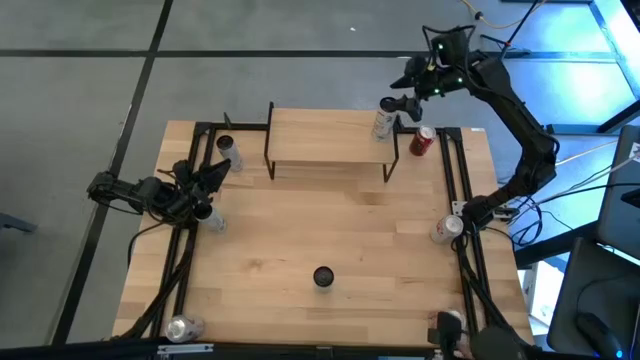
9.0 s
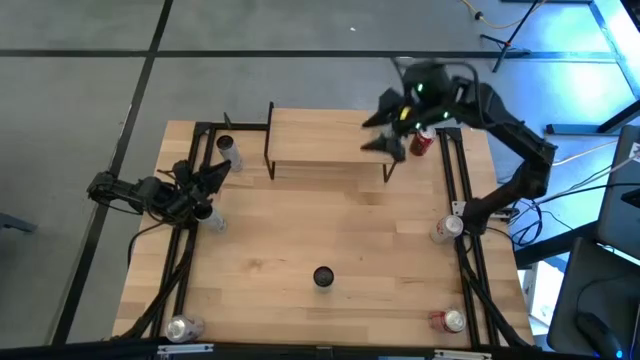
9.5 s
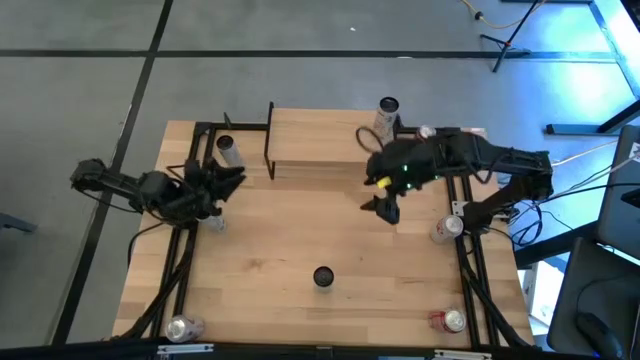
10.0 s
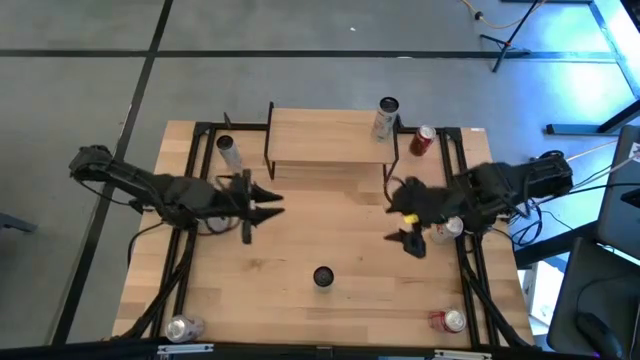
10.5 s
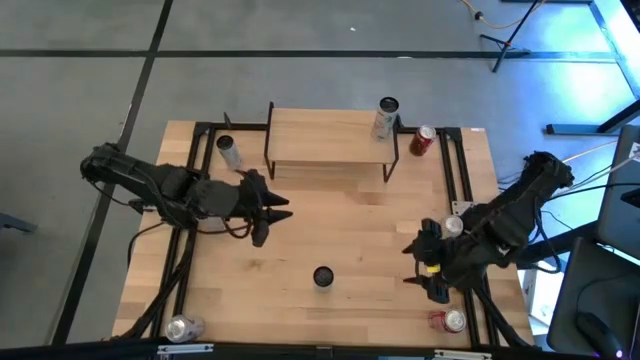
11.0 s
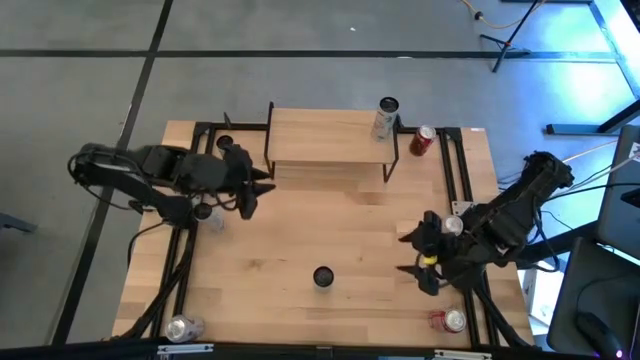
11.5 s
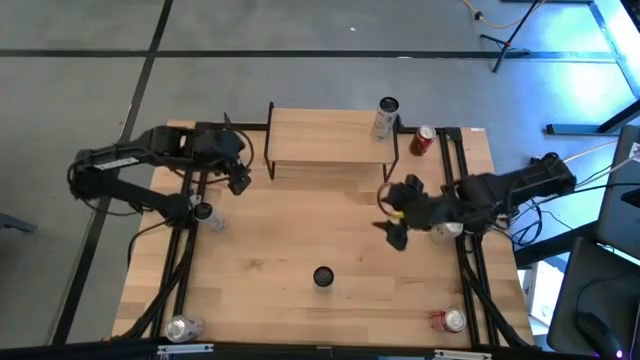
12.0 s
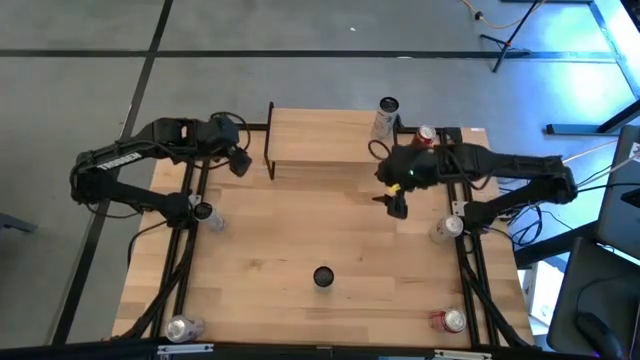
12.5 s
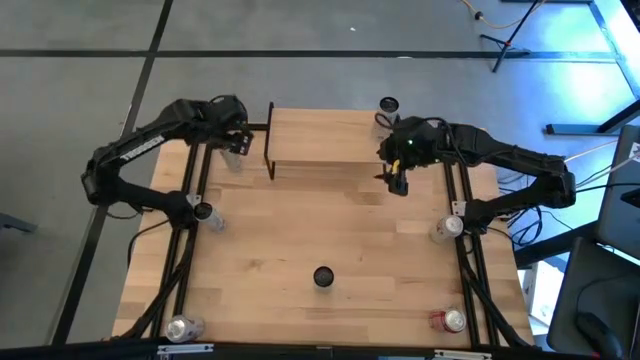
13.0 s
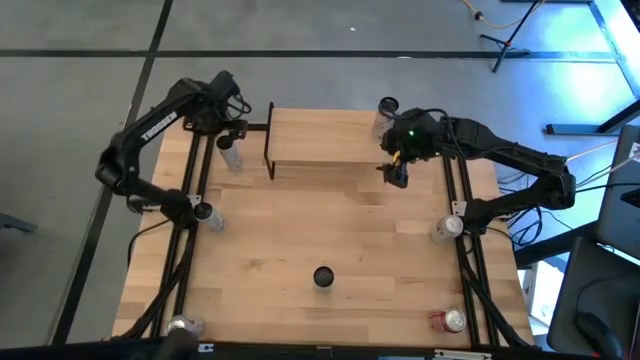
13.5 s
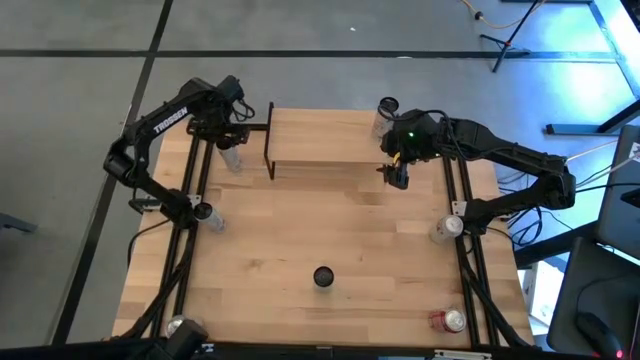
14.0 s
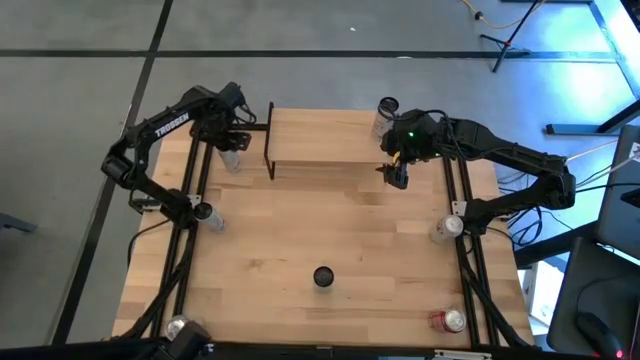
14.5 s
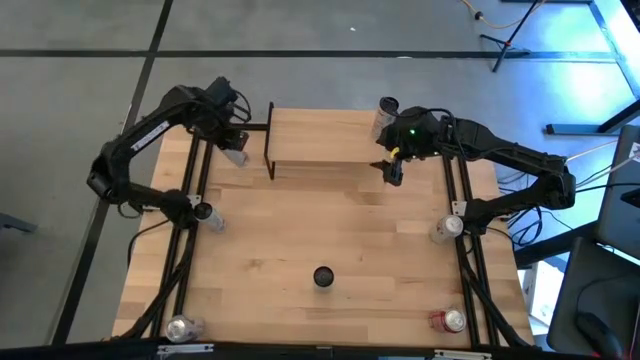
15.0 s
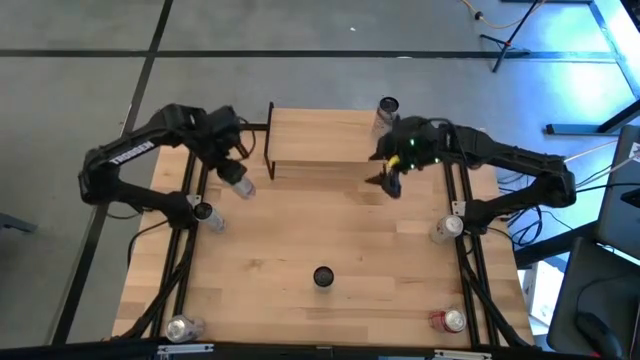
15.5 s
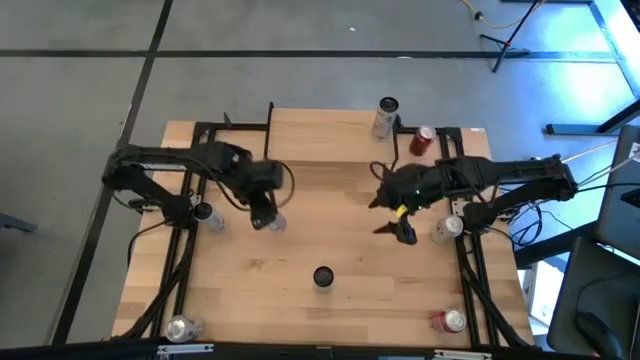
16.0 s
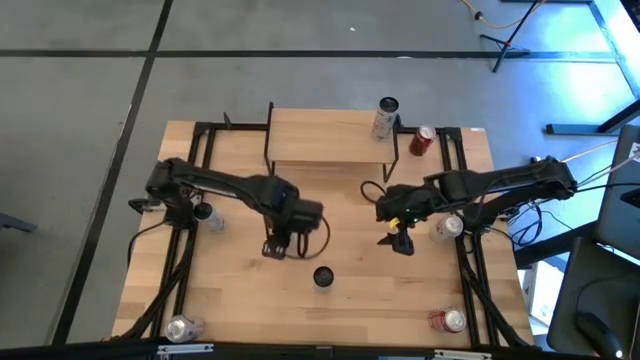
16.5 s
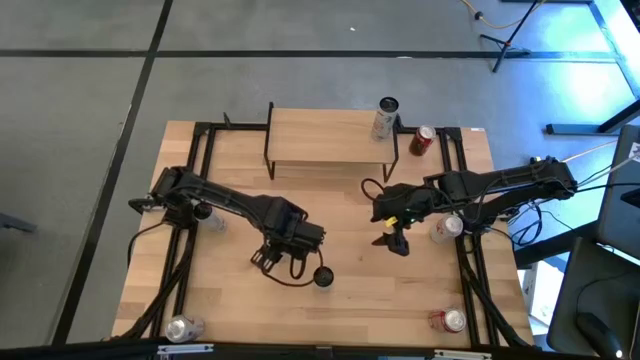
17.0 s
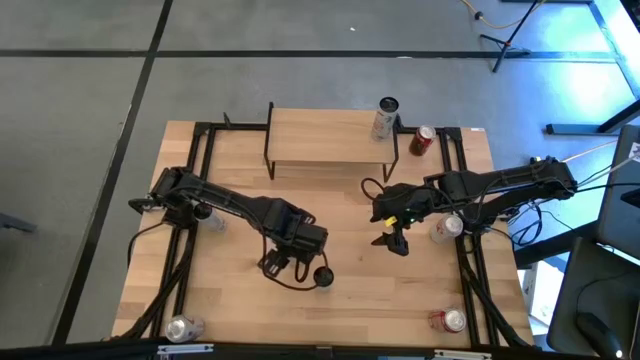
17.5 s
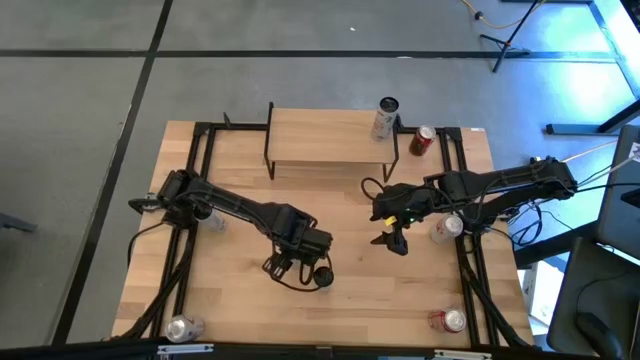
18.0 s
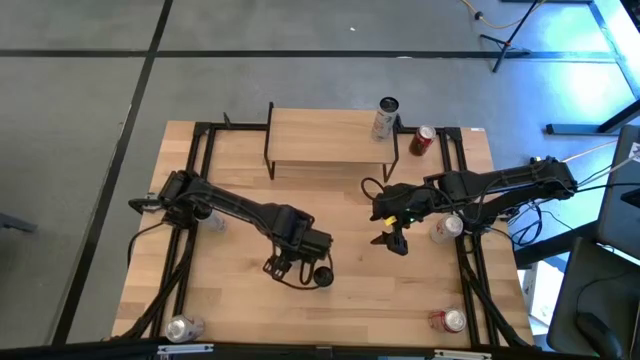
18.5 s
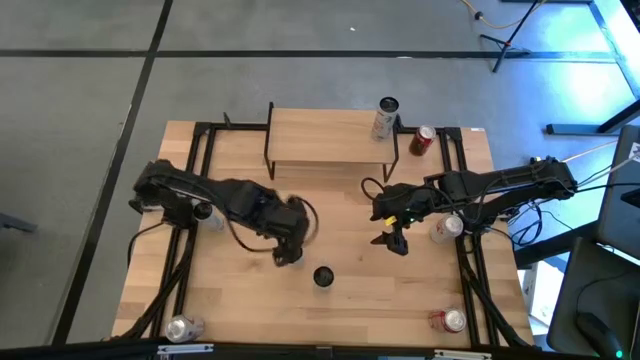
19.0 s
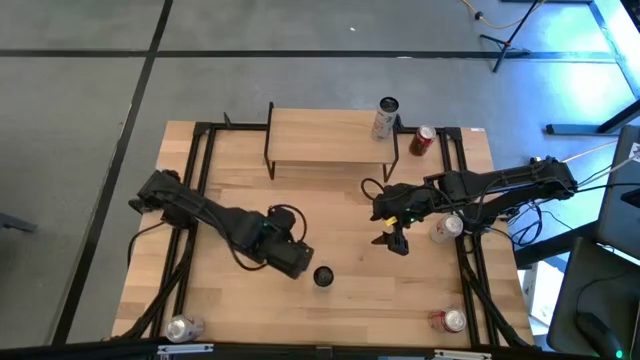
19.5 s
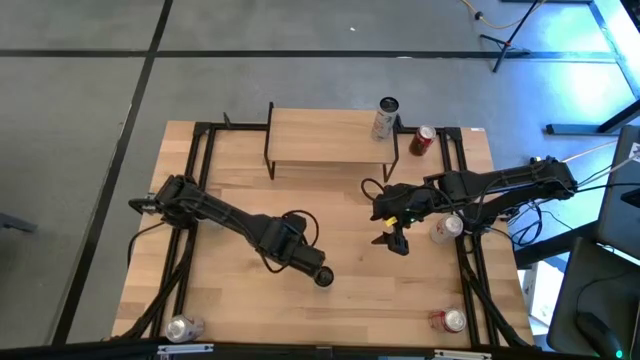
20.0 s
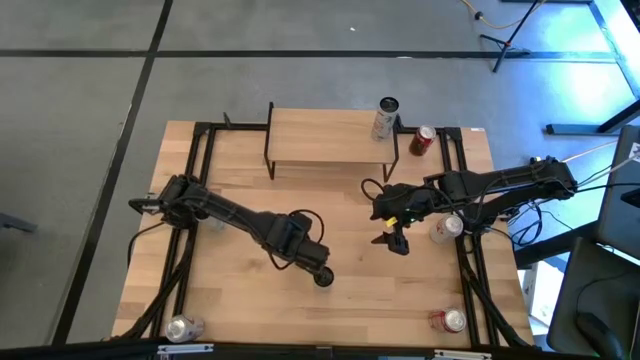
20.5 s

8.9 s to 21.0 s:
Task: Place canned beverage on shelf
Put the white-pink soda can on the shelf aligned with the other white-pink soda can

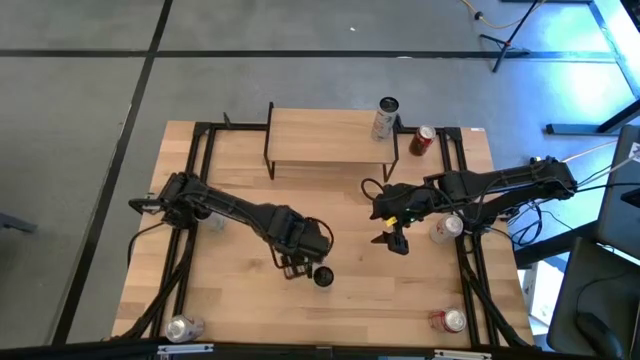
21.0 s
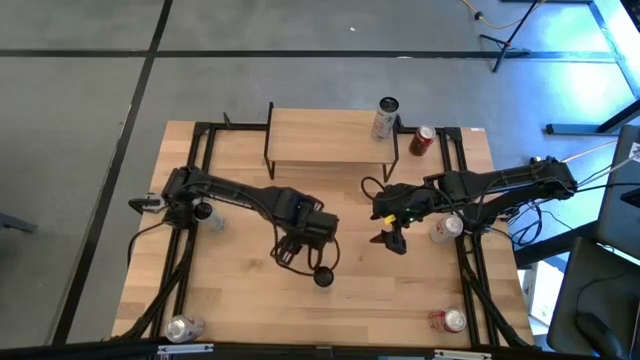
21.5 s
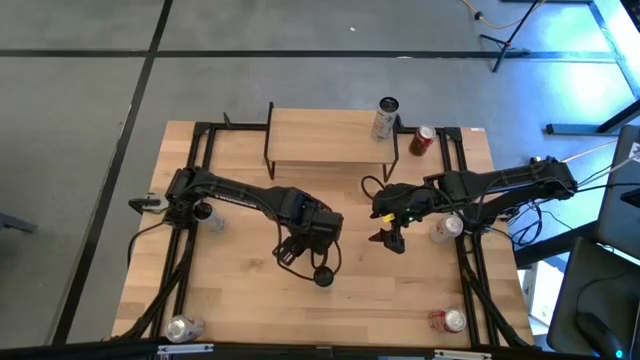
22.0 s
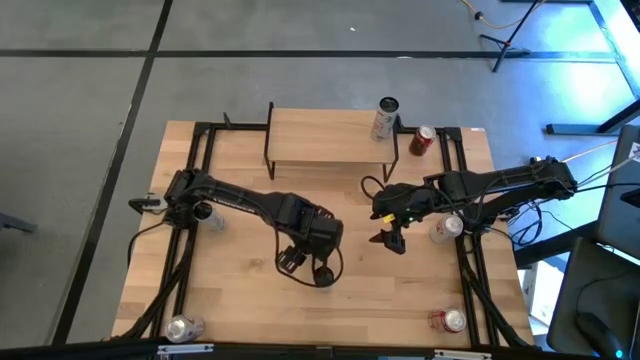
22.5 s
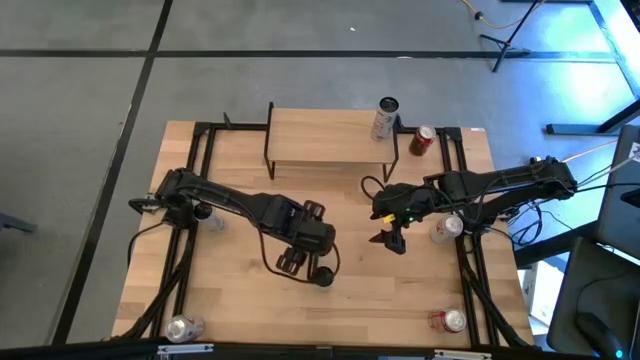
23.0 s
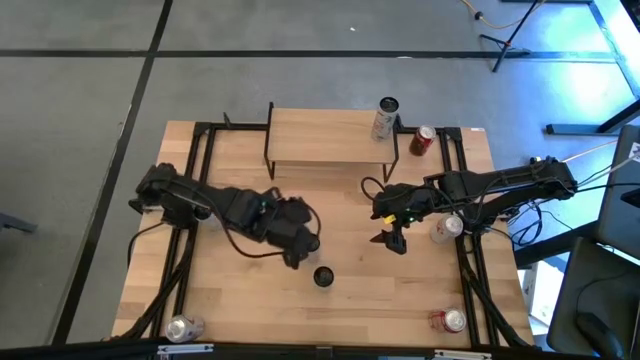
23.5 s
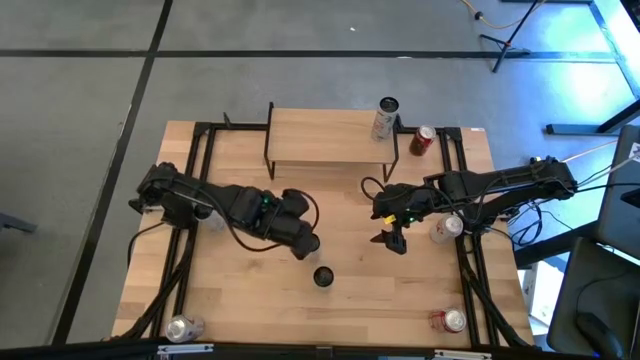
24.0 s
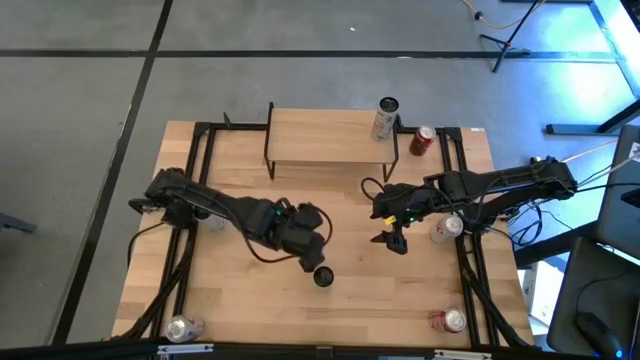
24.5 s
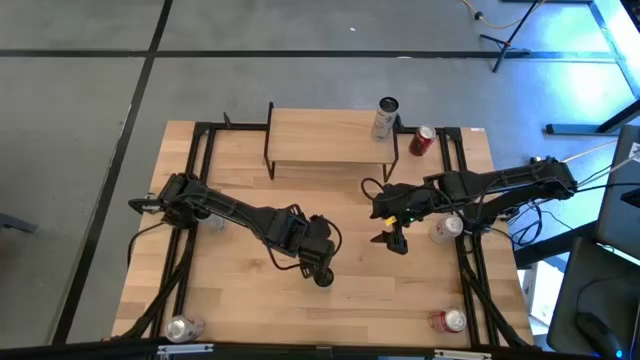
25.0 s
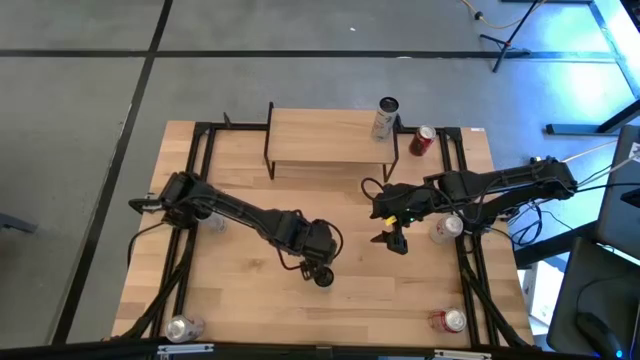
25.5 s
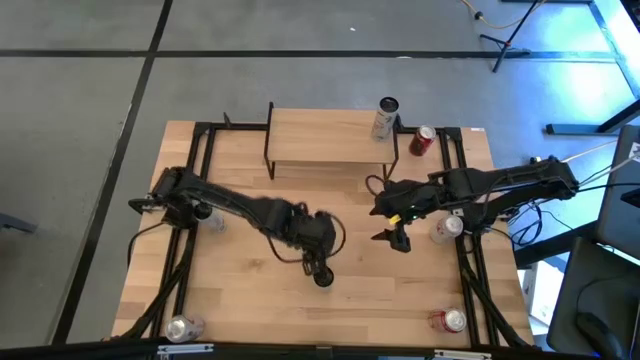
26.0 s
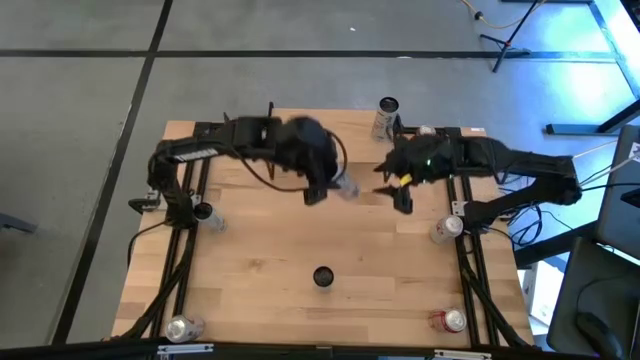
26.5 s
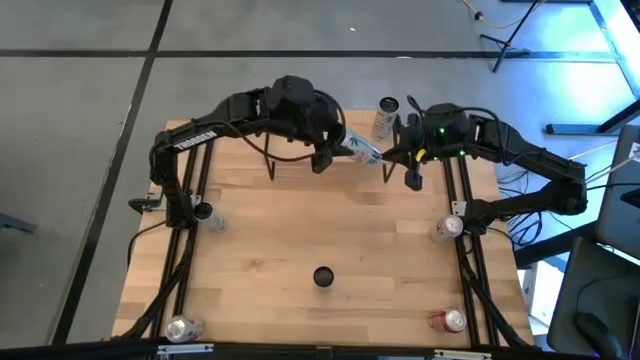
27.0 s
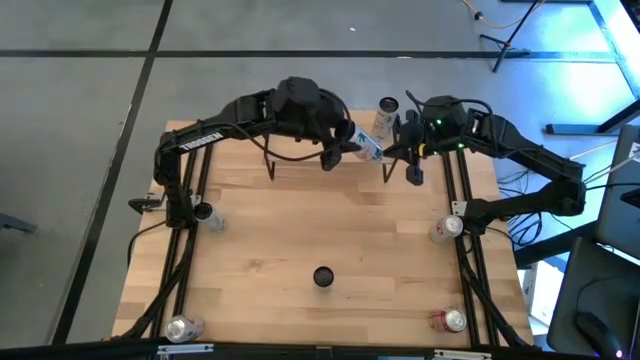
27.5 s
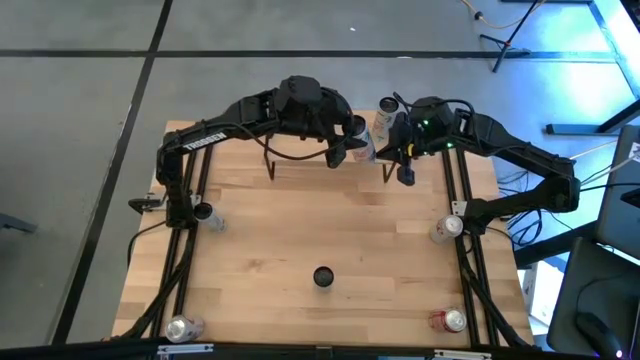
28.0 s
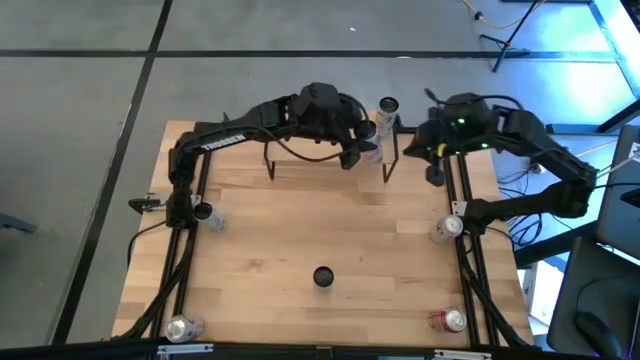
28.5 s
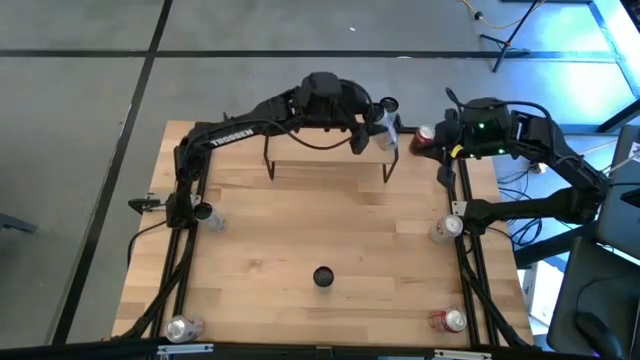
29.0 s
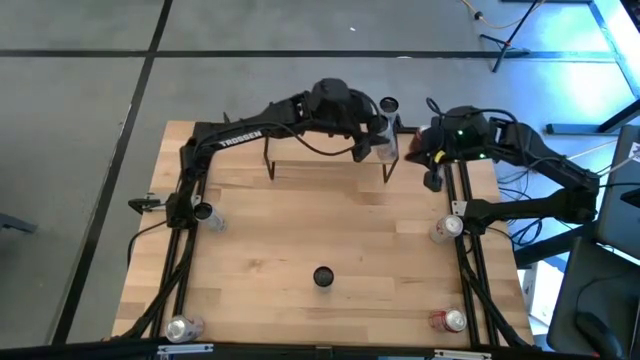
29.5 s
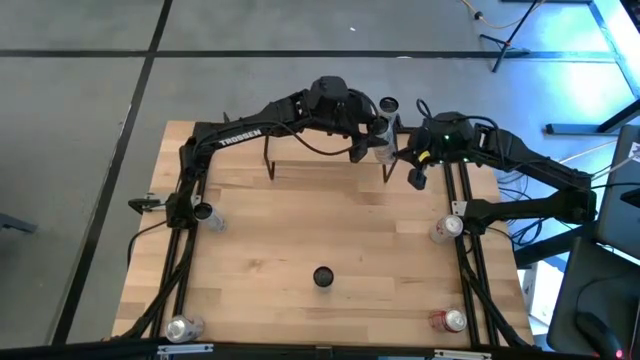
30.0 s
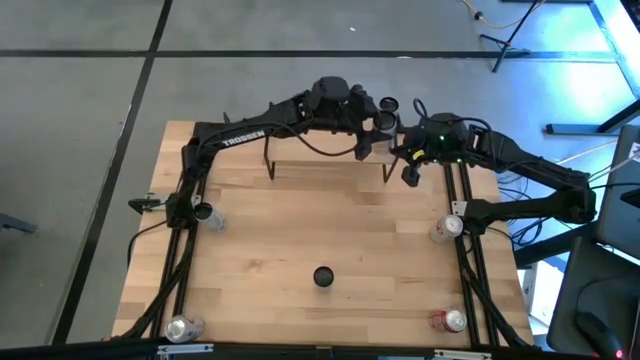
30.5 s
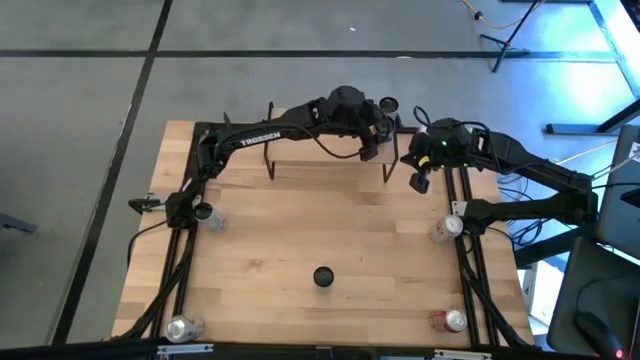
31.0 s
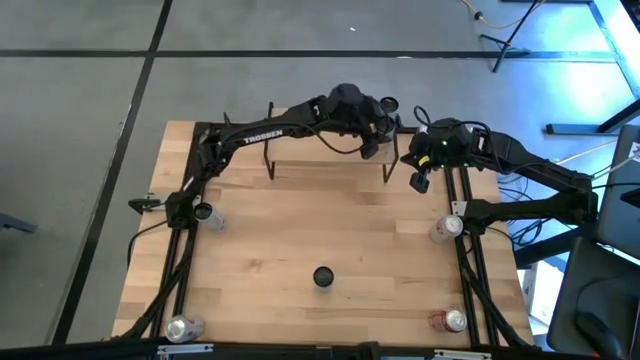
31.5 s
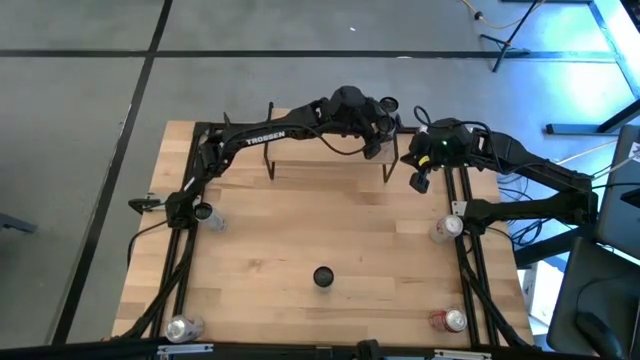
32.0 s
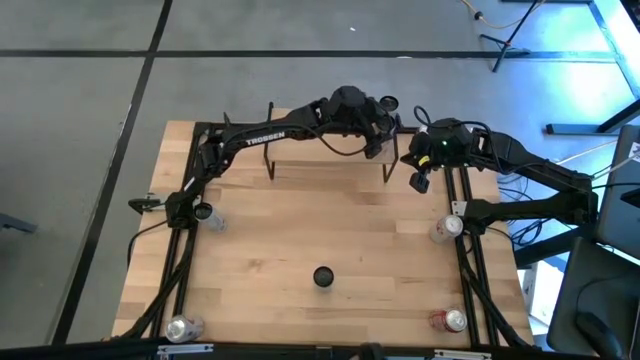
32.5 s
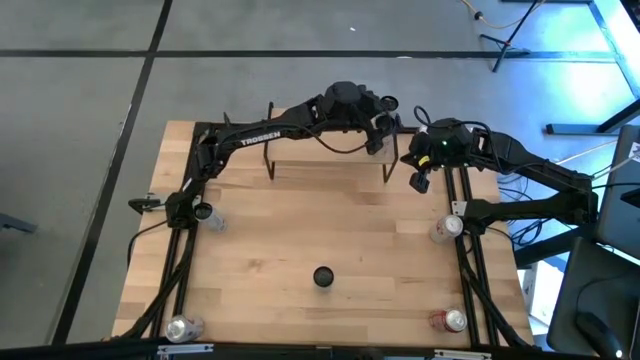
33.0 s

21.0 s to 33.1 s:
Put the white-pink soda can on the shelf aligned with the other white-pink soda can
